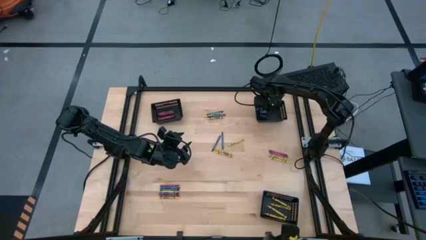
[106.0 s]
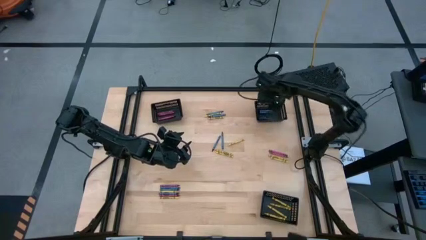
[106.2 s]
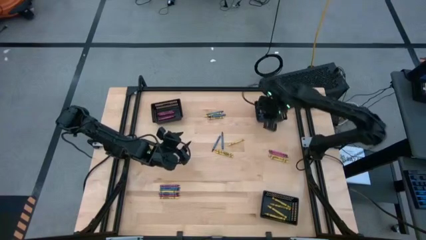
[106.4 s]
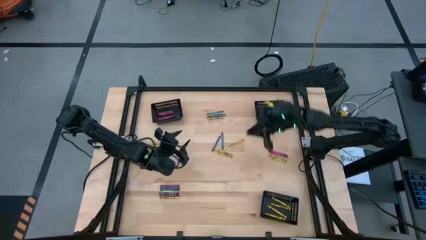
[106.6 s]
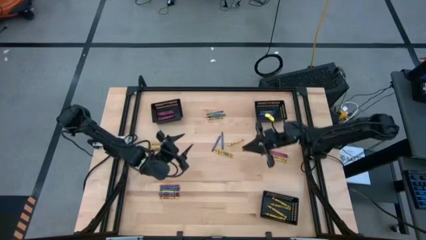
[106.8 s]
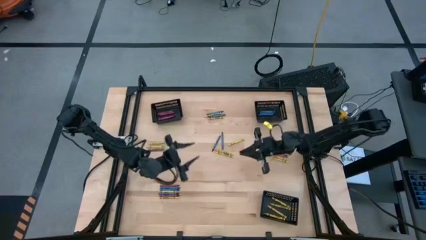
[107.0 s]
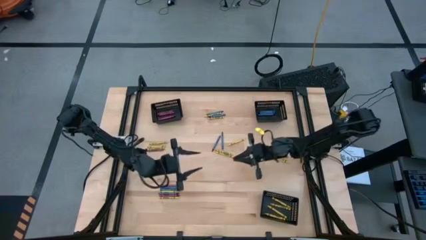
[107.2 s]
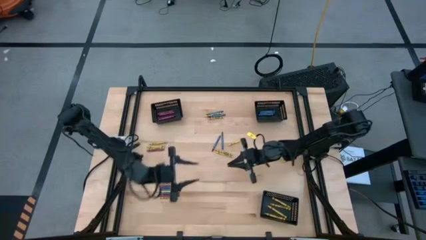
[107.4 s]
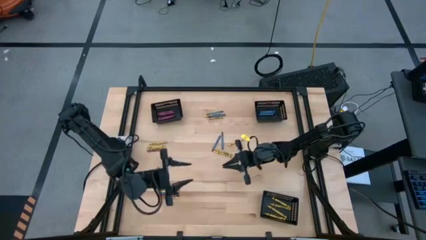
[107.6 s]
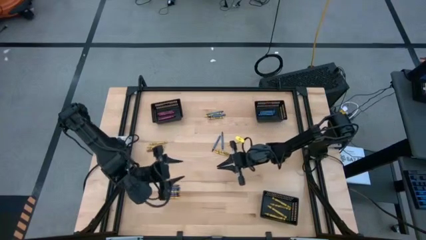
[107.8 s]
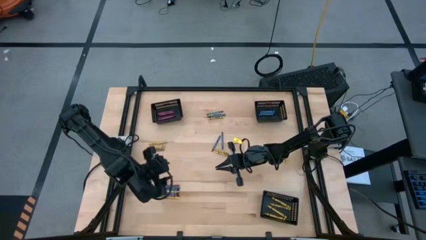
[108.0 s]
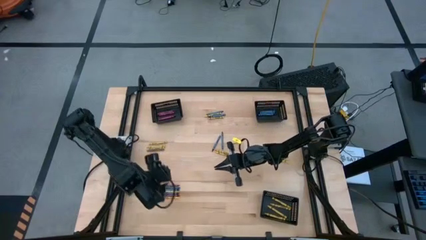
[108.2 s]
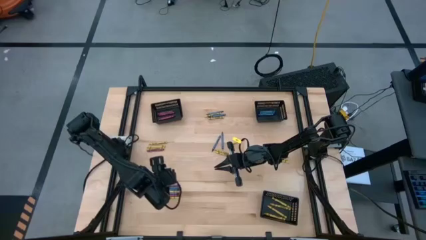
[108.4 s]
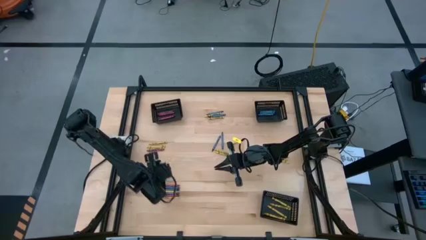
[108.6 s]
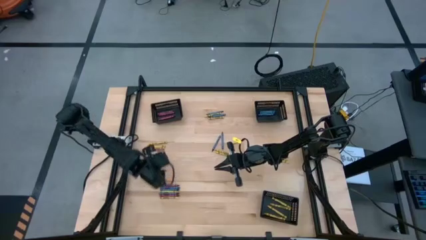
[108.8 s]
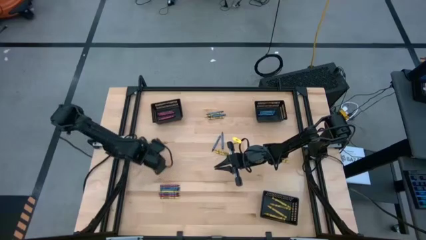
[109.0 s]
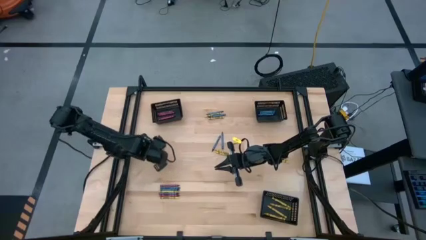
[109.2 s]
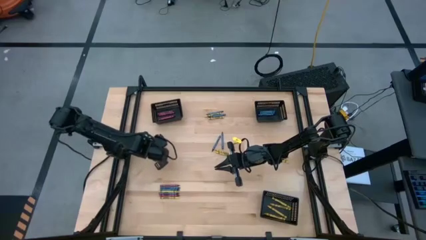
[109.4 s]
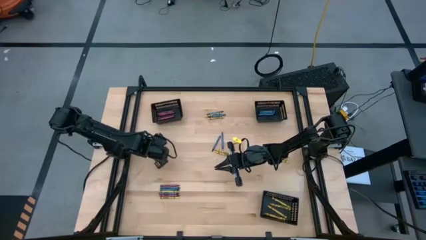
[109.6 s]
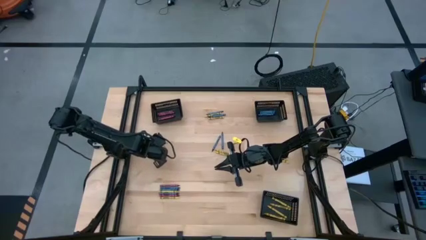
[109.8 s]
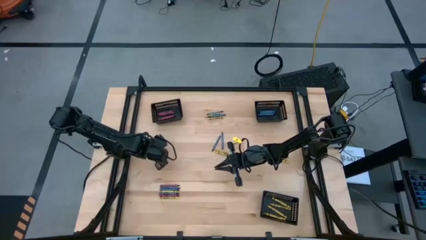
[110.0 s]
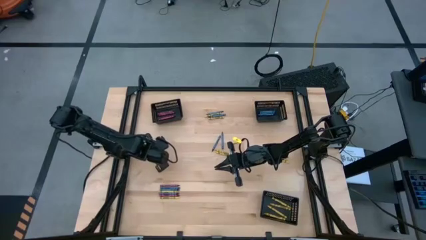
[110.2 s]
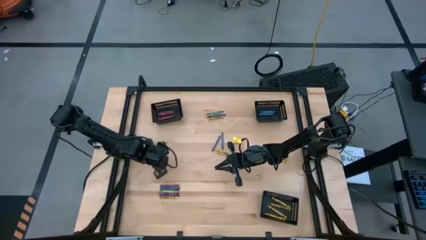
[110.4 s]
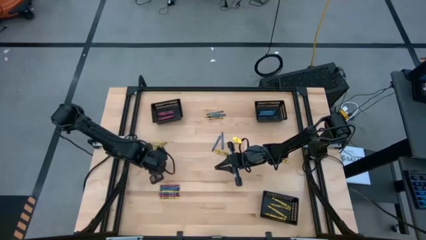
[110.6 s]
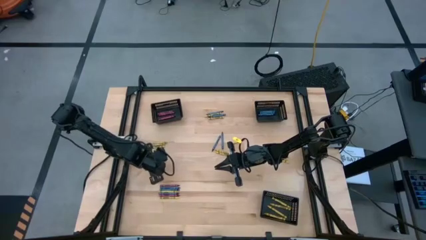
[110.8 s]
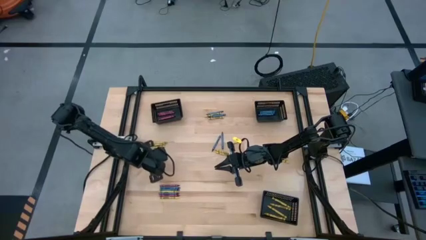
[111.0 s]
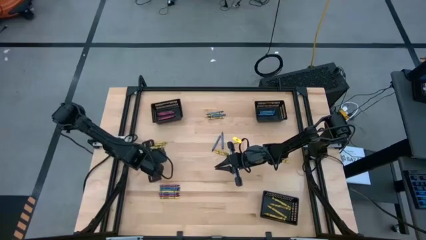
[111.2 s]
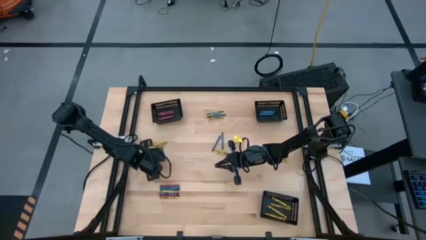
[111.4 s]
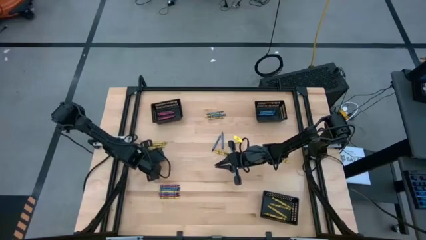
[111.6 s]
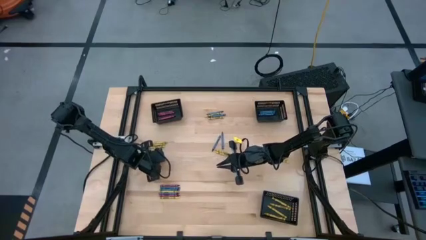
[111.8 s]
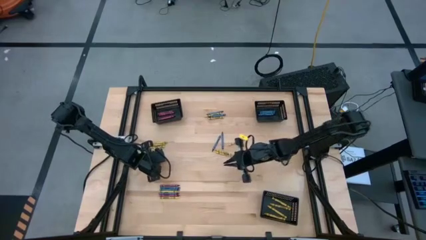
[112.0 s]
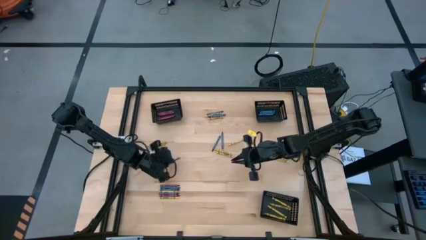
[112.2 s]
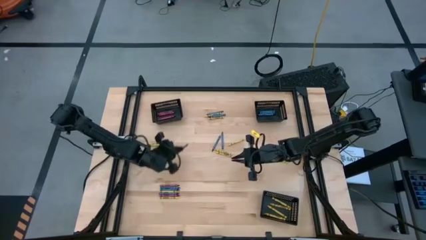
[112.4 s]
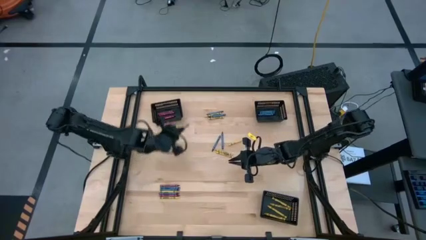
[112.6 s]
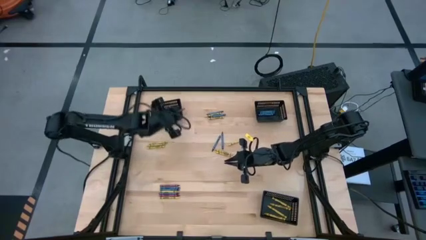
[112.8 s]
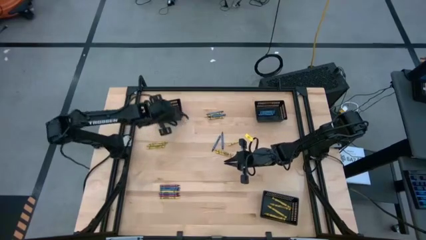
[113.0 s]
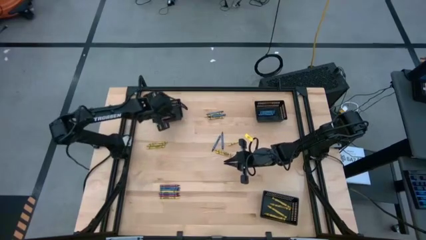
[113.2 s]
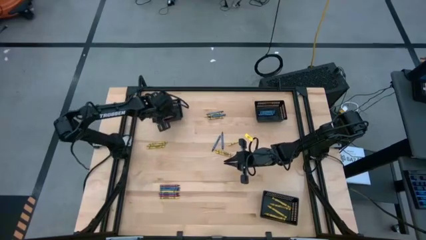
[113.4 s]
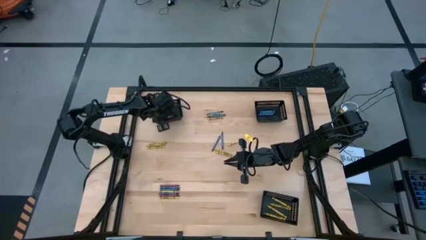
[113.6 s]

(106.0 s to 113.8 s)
Task: Sort crayons
Put the red crayon into the top left black bin

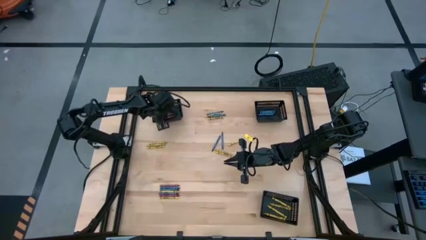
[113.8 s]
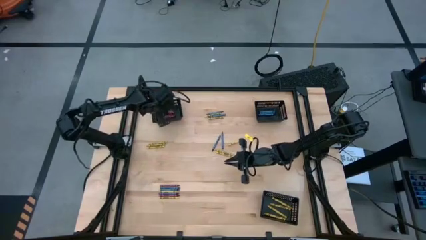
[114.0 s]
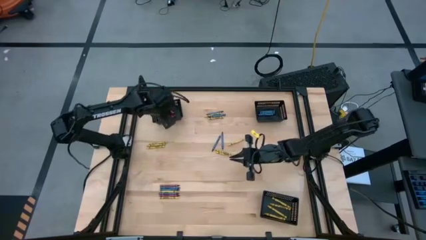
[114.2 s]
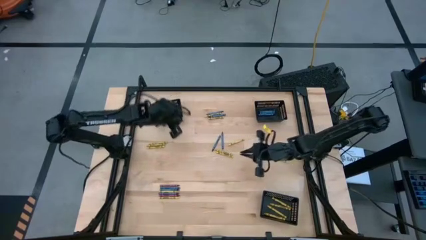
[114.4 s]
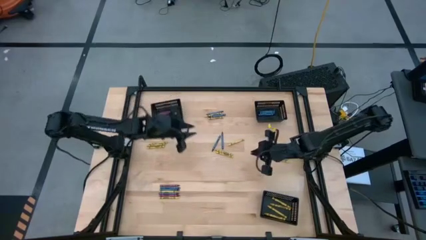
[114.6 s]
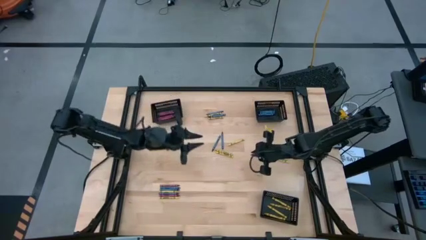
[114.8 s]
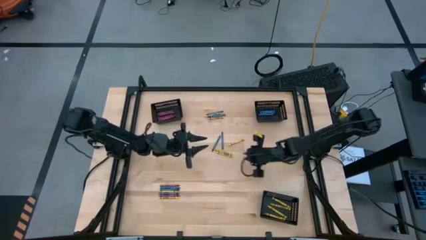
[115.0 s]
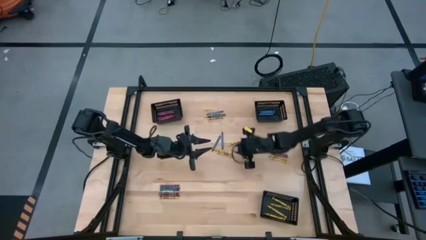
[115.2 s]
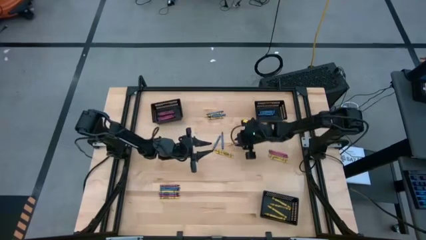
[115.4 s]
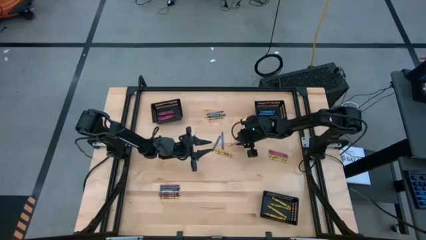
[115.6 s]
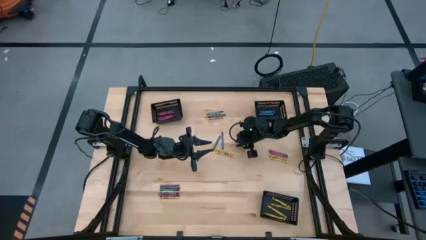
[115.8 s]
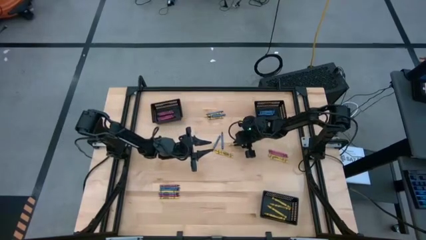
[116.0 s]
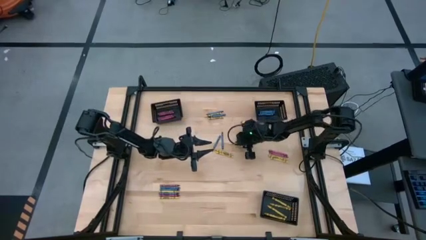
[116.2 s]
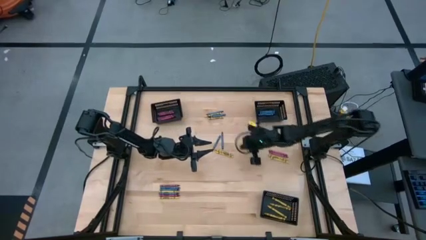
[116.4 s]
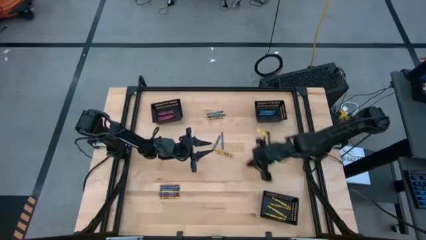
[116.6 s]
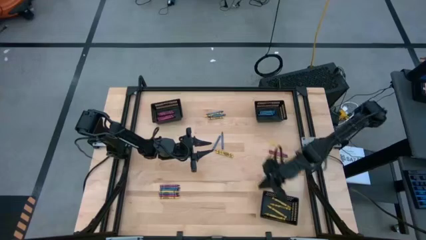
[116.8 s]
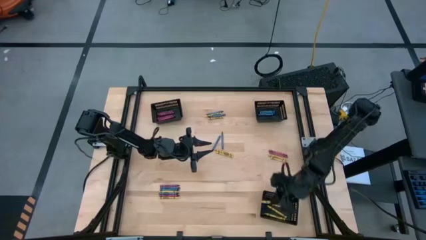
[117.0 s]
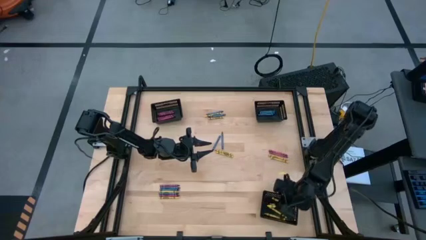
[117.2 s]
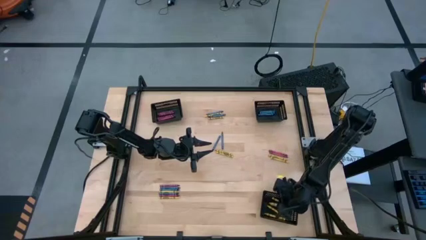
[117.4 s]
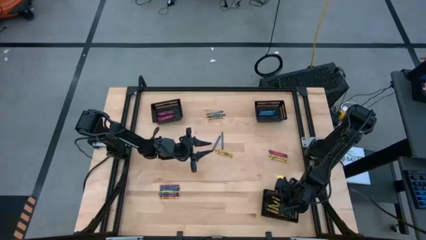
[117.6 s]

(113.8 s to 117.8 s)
Put the yellow crayon into the bottom black bin
